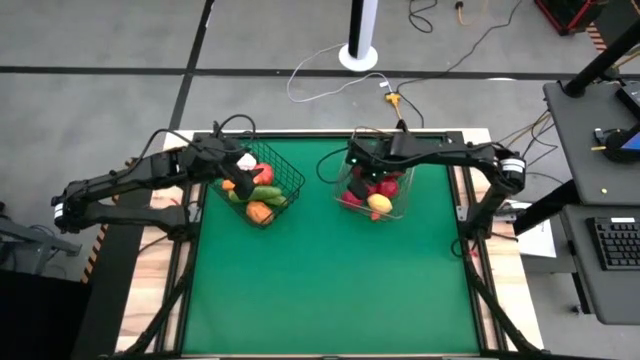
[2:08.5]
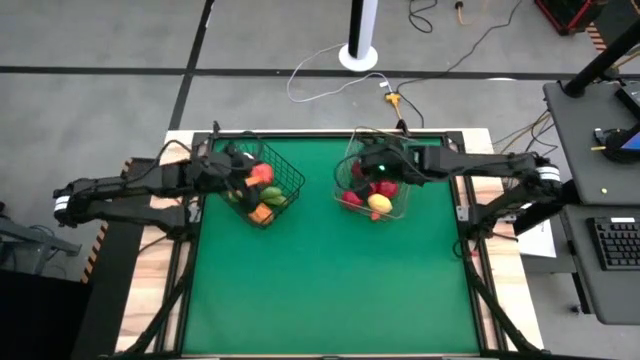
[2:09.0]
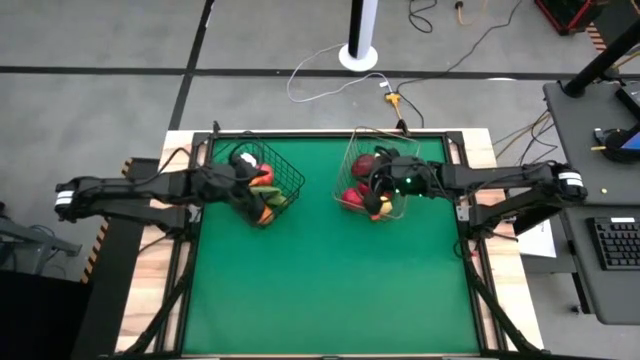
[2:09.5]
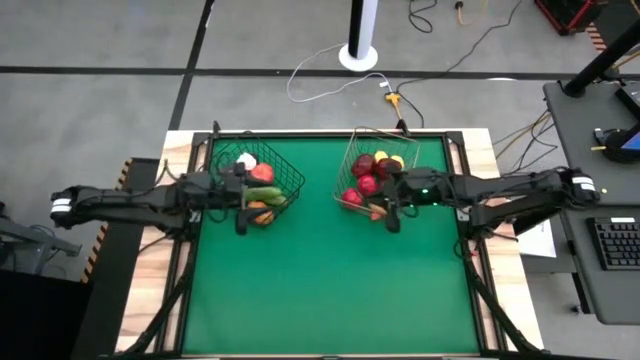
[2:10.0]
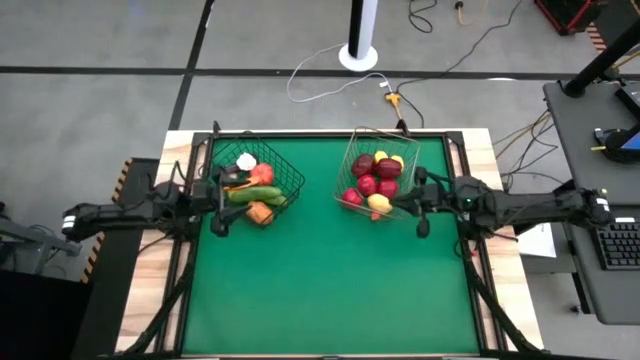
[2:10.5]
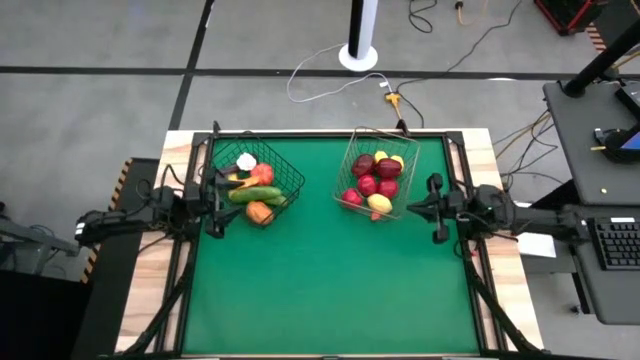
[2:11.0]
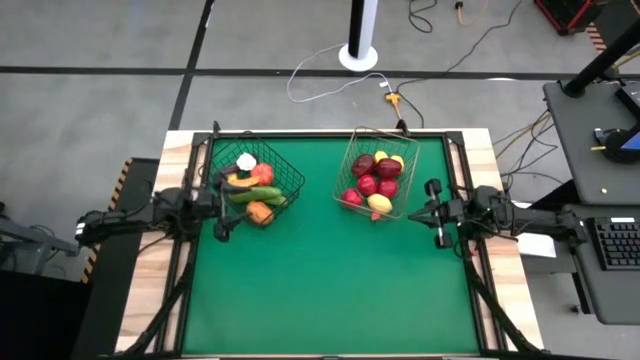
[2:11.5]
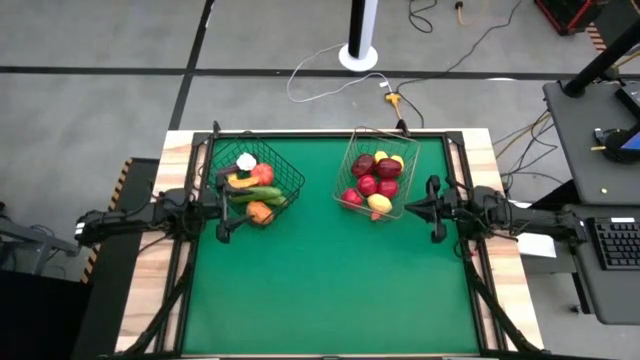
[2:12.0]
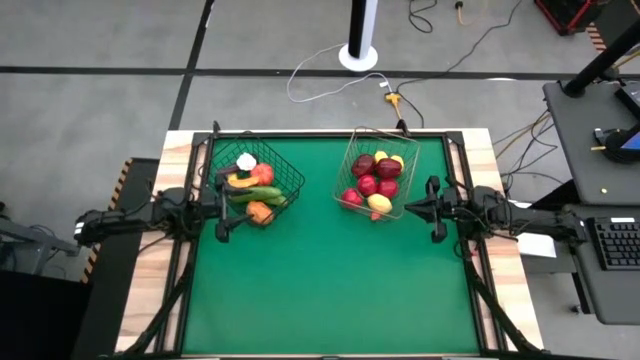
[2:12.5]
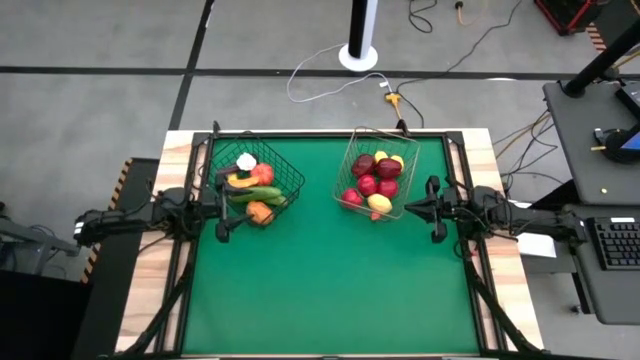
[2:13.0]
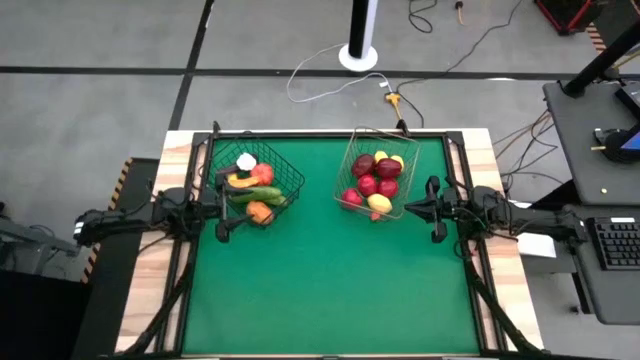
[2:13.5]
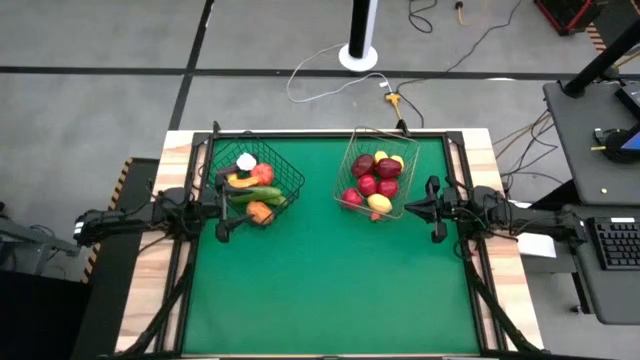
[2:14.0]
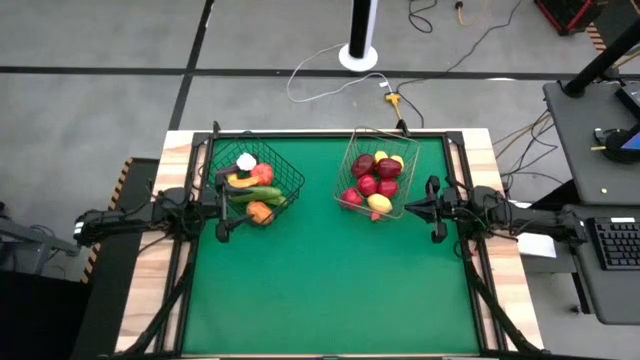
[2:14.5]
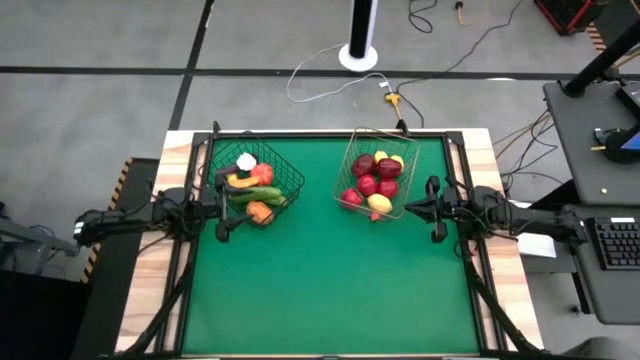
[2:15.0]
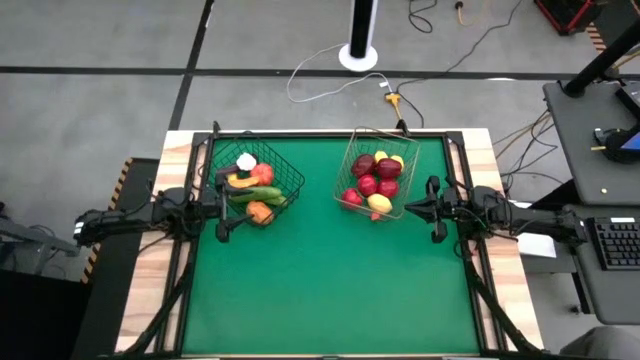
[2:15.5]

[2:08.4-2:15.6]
Task: Sort produce into baskets
Return to Home Position

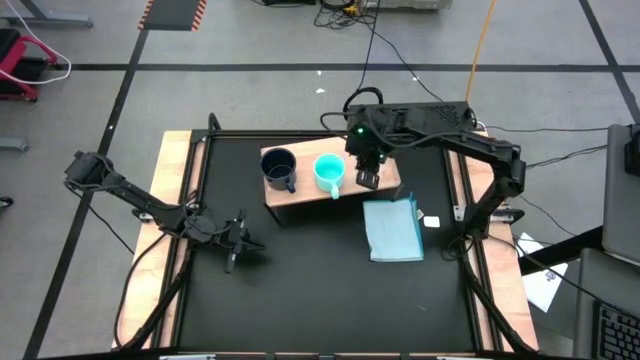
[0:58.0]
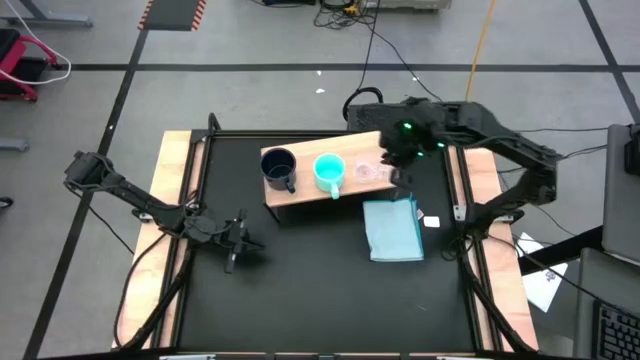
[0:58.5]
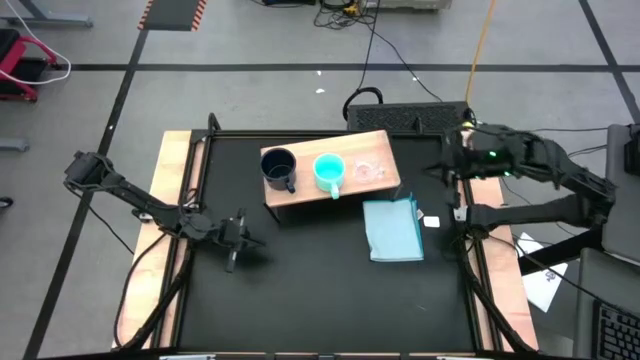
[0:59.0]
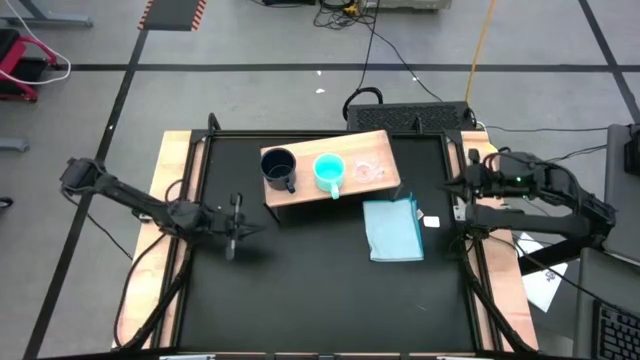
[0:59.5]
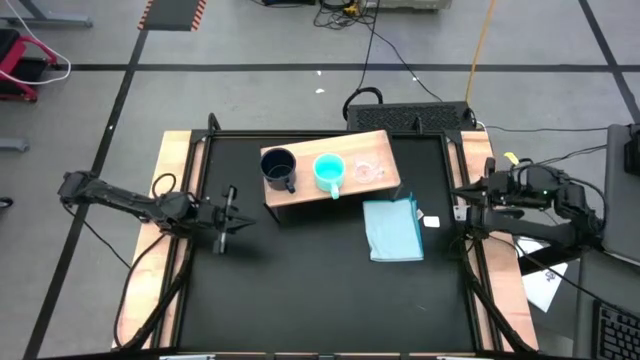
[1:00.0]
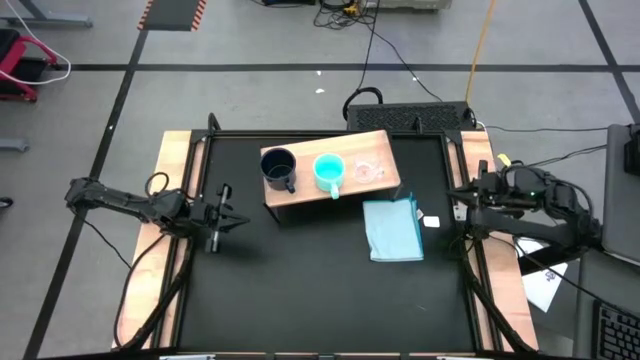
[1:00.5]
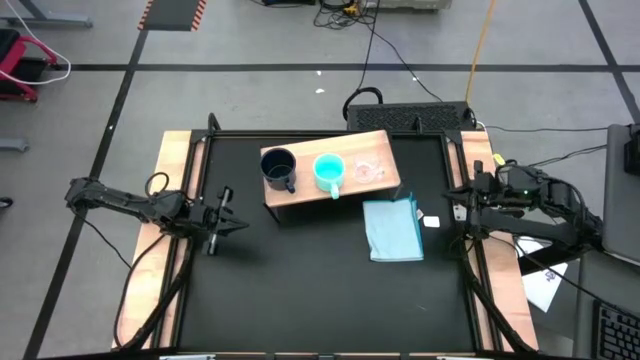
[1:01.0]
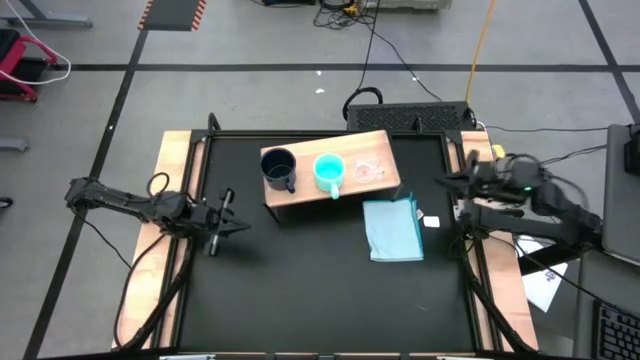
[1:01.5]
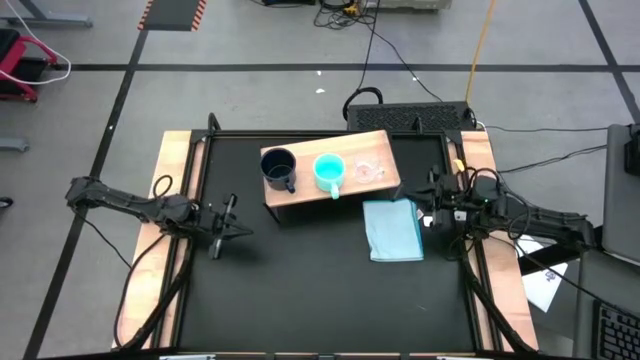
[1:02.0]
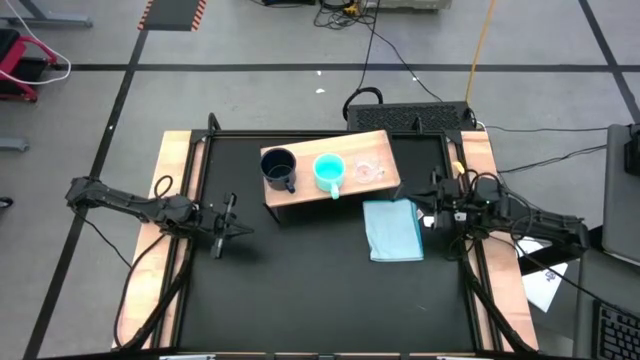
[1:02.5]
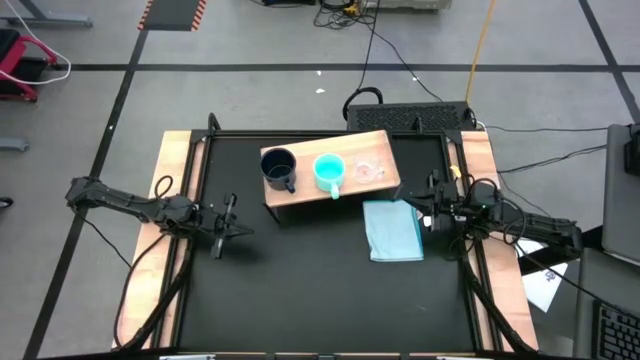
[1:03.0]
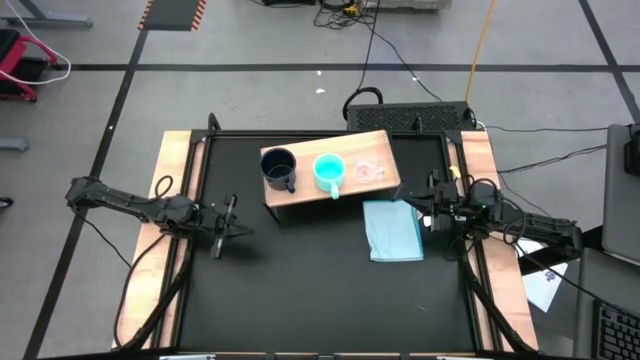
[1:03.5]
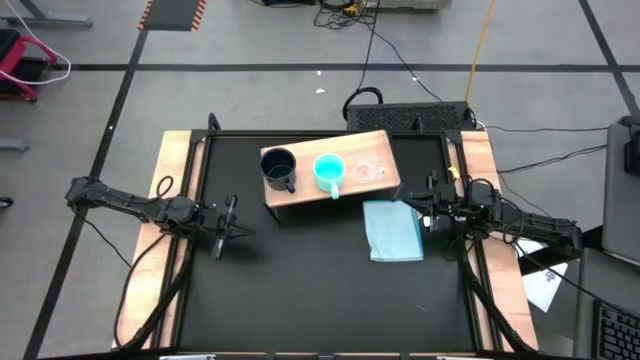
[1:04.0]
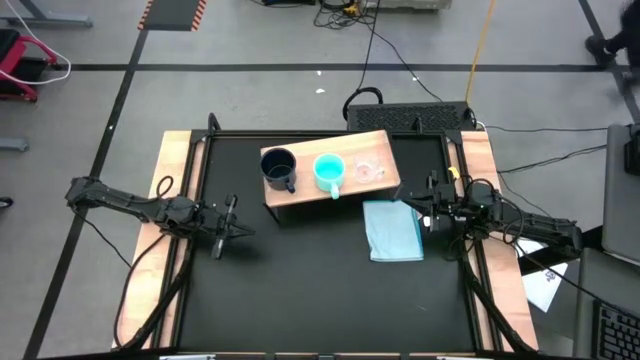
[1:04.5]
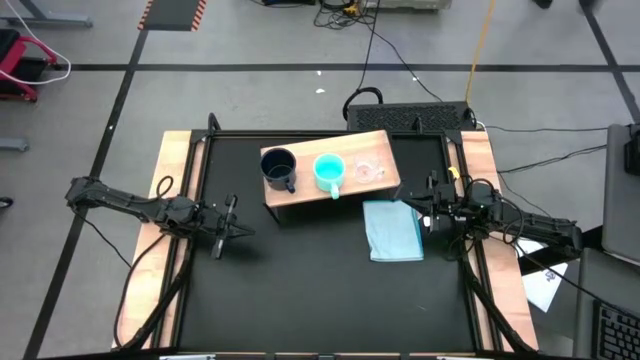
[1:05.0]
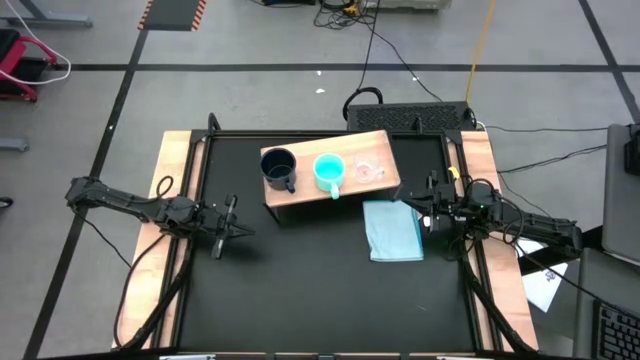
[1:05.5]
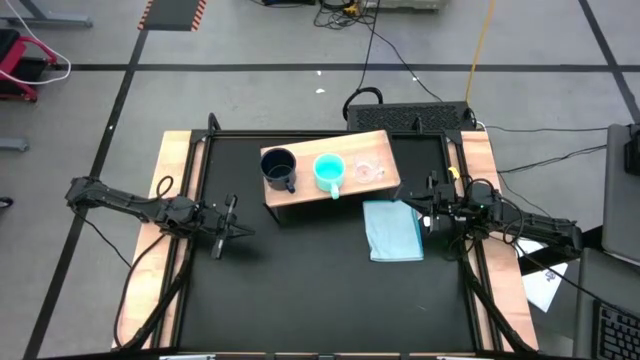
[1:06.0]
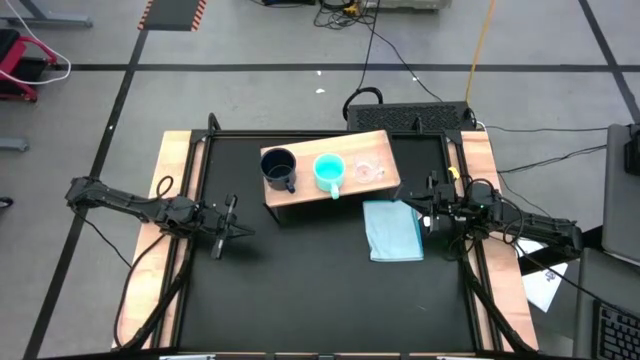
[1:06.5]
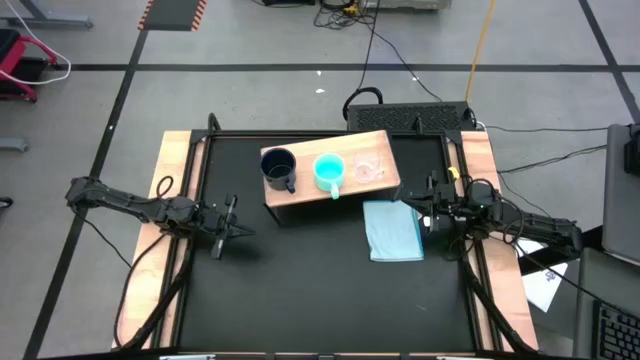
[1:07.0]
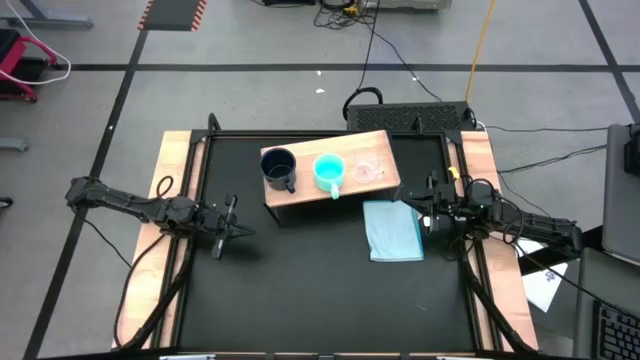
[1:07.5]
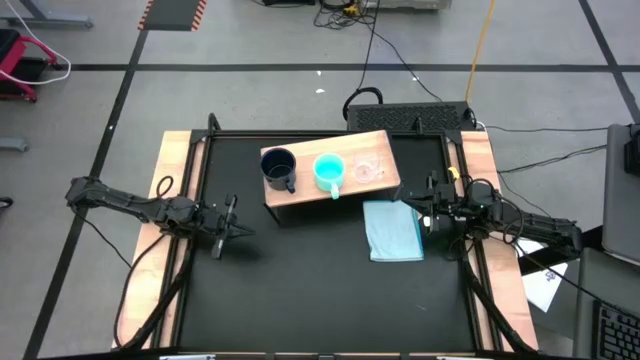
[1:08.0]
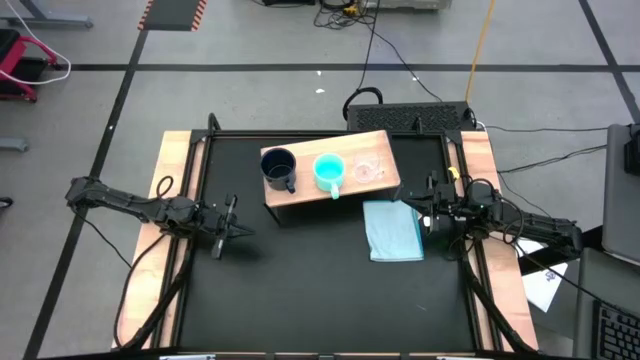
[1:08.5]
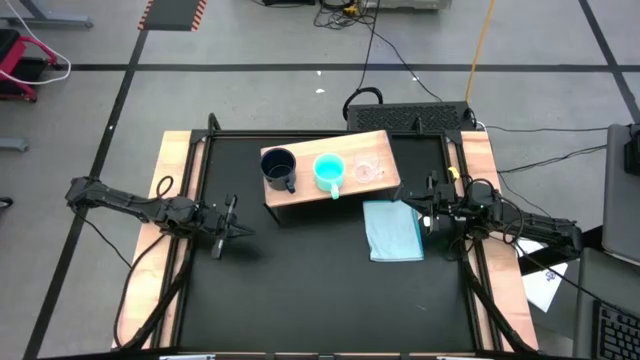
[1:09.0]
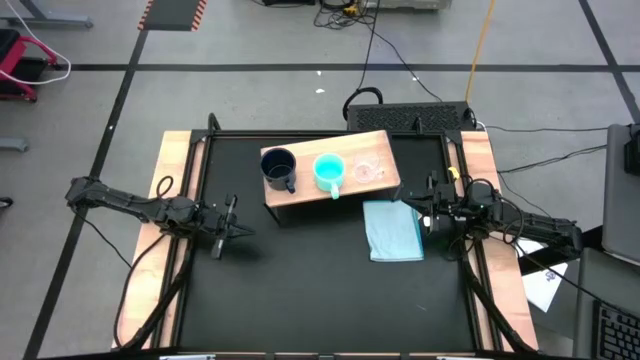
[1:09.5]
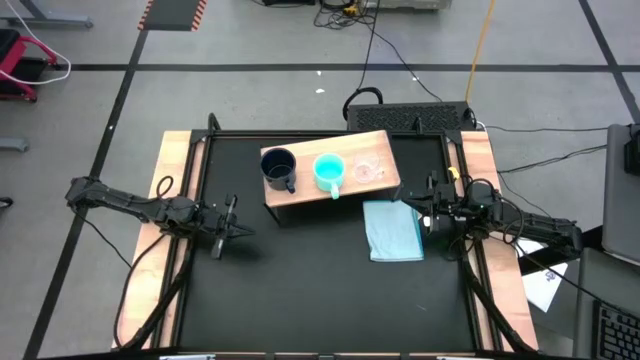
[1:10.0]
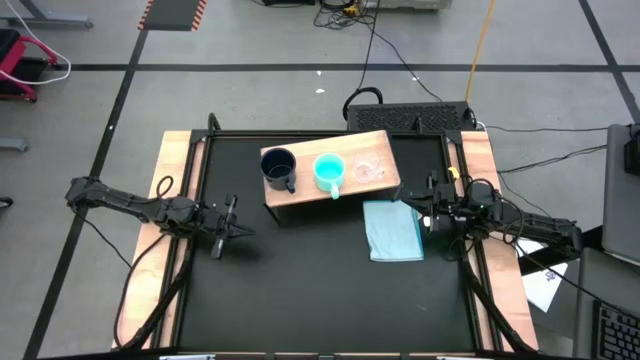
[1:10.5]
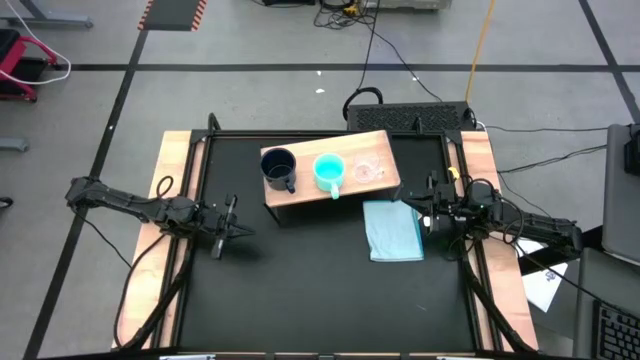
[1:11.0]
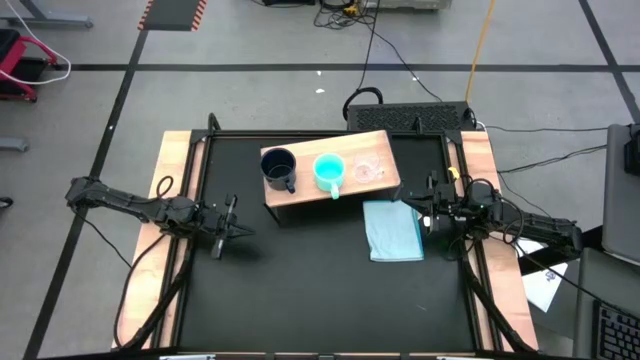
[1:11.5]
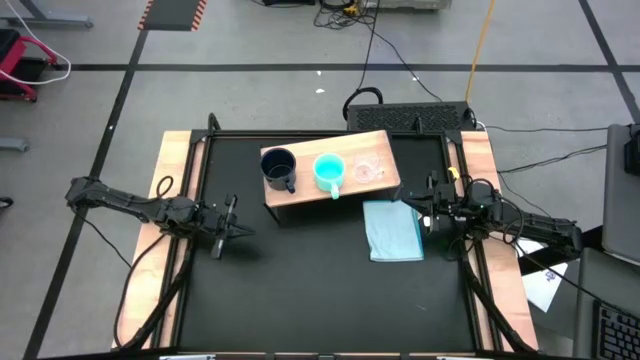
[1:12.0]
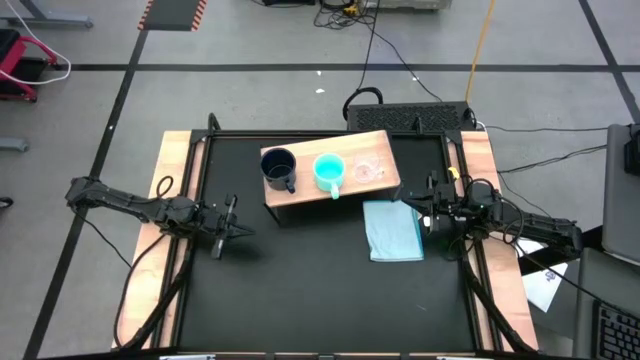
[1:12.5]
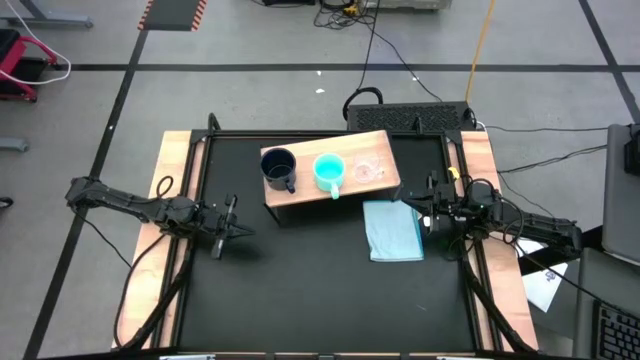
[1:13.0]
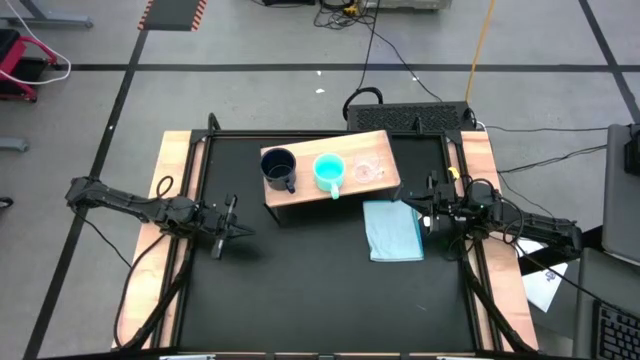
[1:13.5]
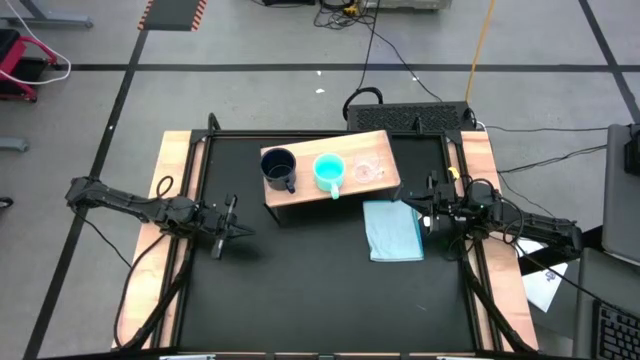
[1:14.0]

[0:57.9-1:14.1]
Task: Stack small to large cups/mugs on shelf
Return to Home Position
